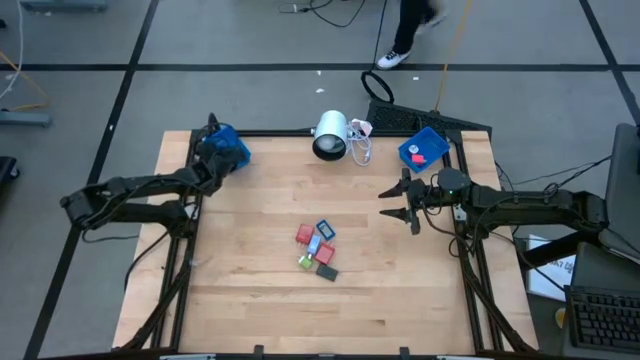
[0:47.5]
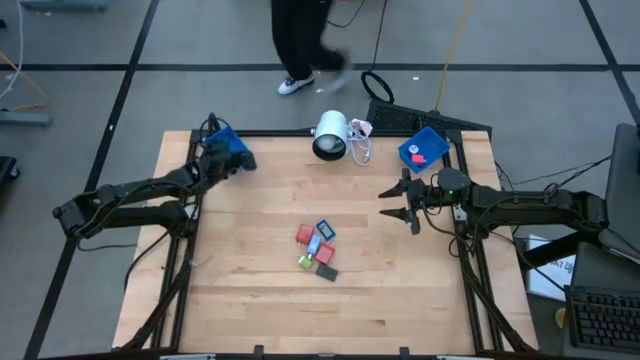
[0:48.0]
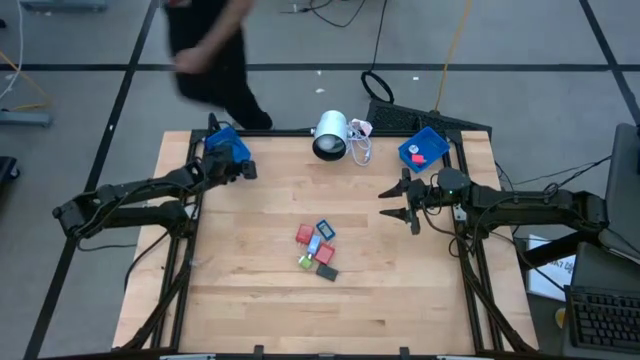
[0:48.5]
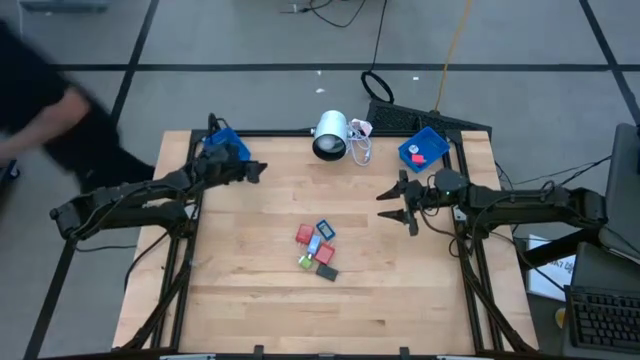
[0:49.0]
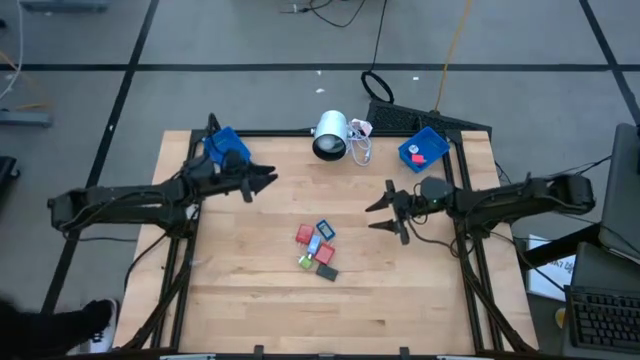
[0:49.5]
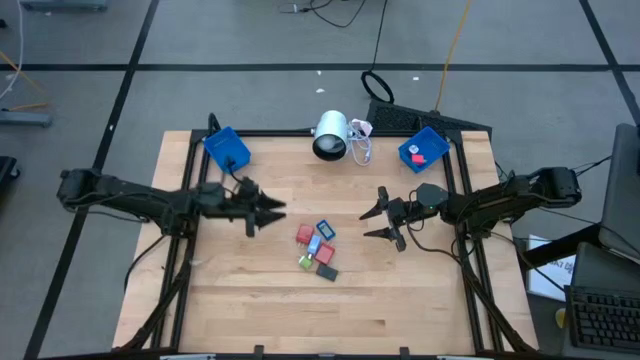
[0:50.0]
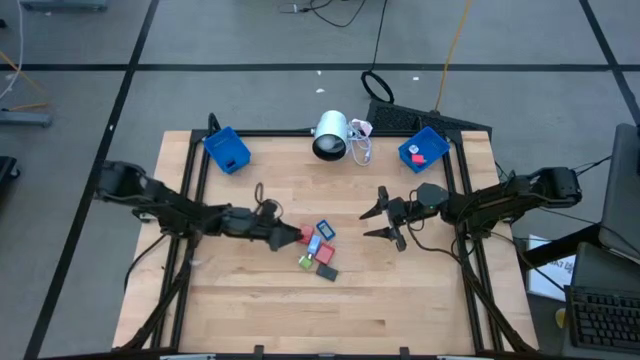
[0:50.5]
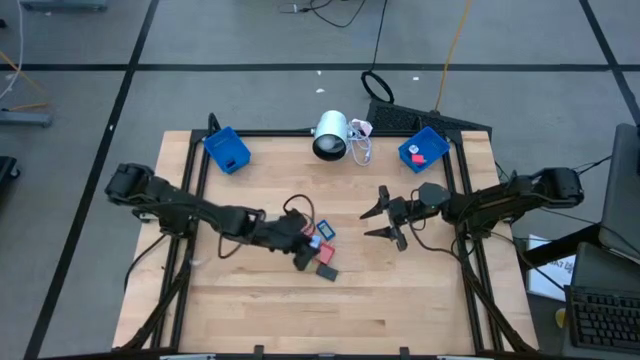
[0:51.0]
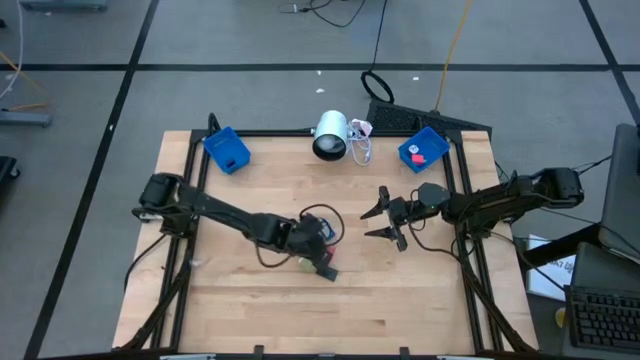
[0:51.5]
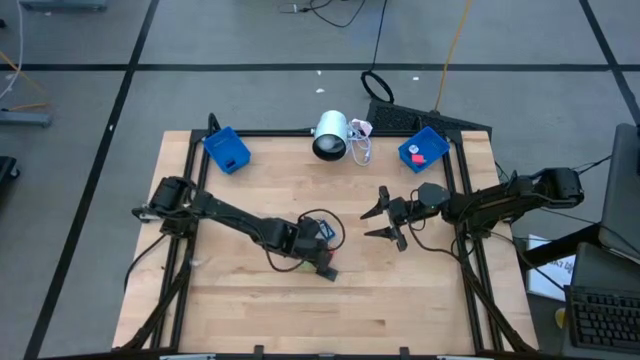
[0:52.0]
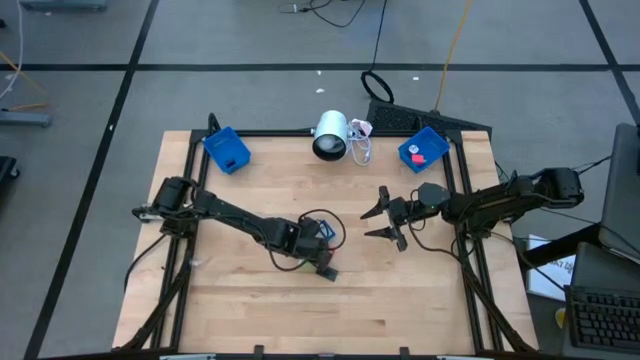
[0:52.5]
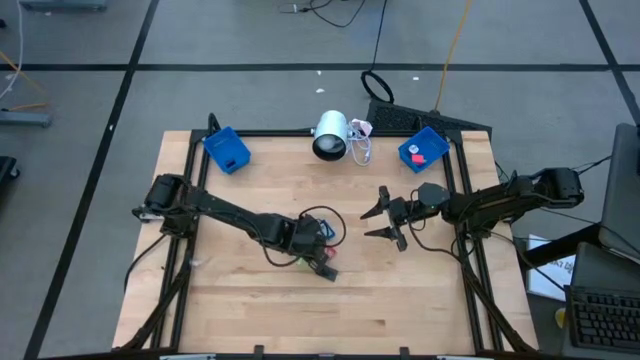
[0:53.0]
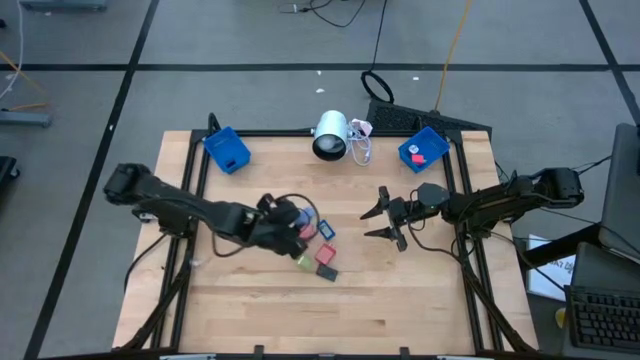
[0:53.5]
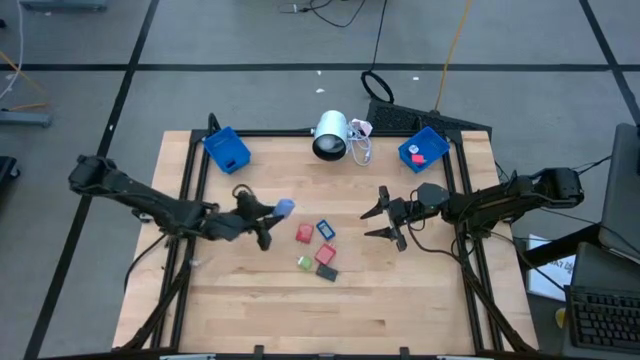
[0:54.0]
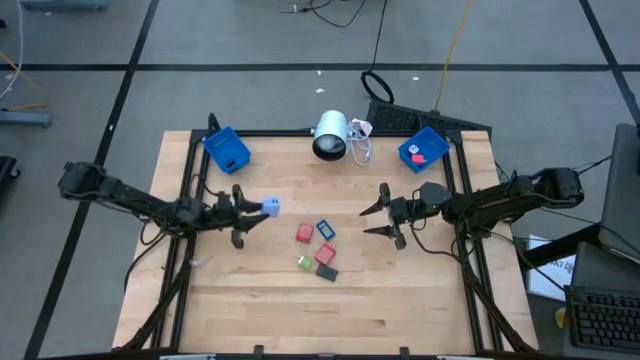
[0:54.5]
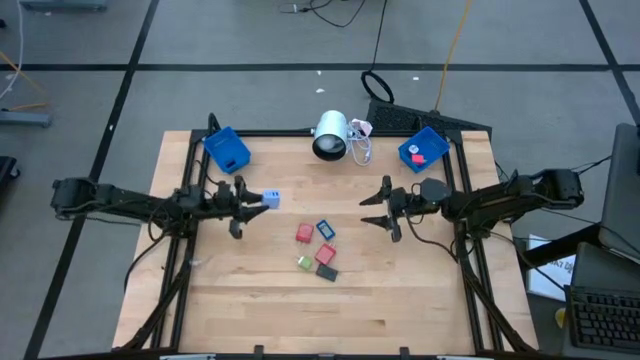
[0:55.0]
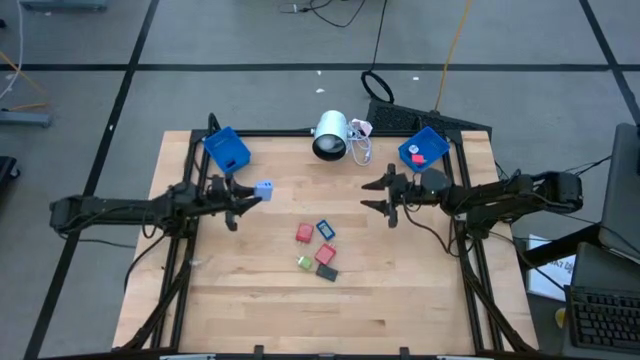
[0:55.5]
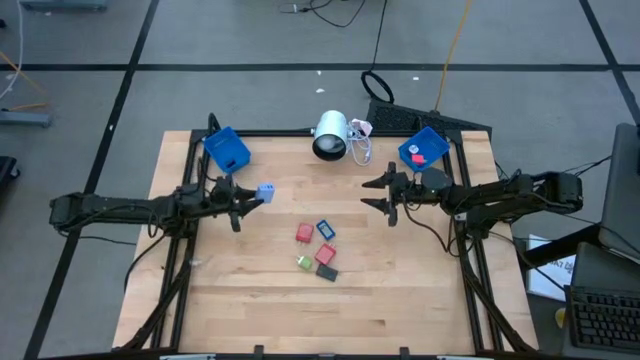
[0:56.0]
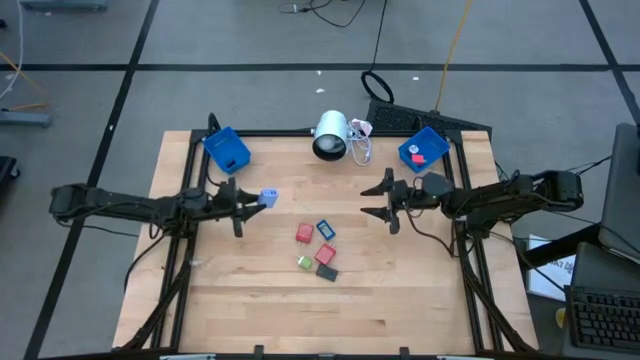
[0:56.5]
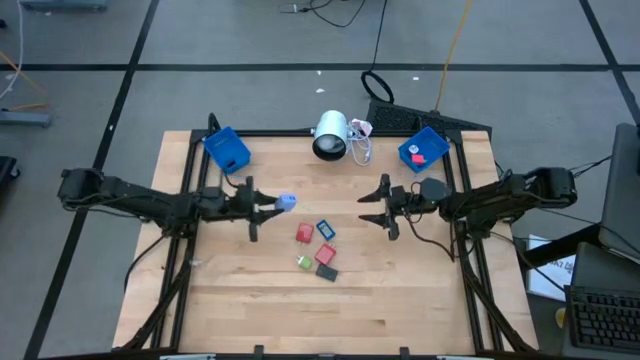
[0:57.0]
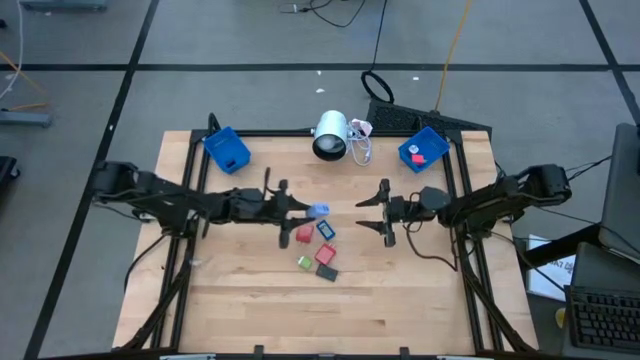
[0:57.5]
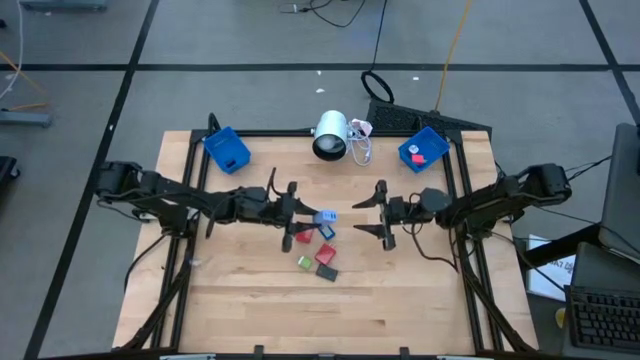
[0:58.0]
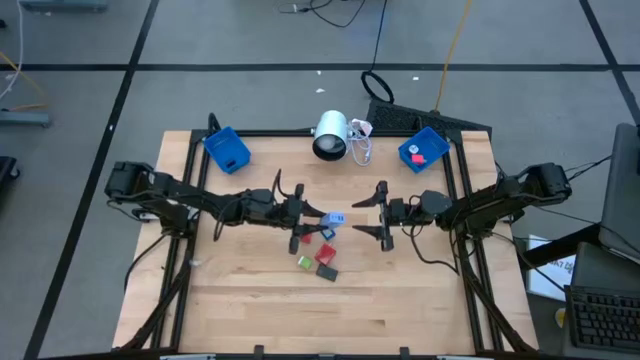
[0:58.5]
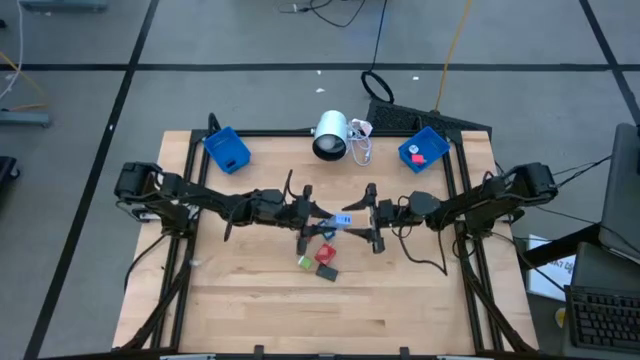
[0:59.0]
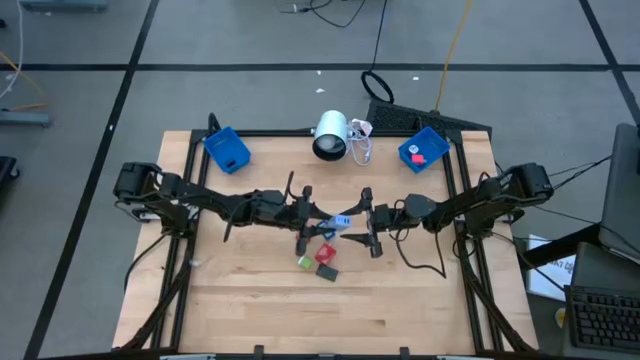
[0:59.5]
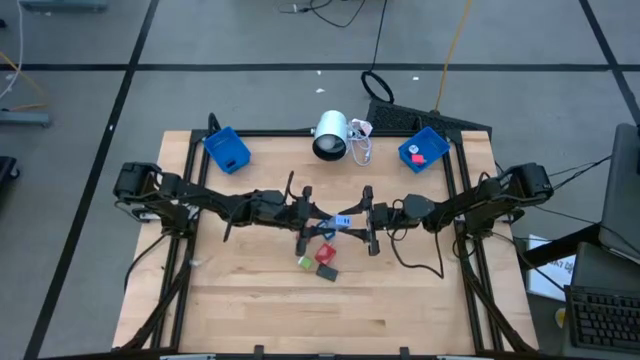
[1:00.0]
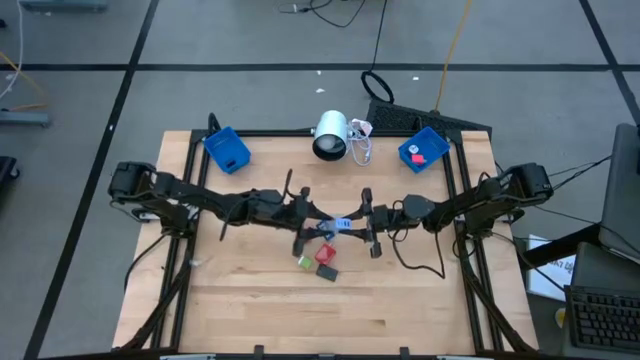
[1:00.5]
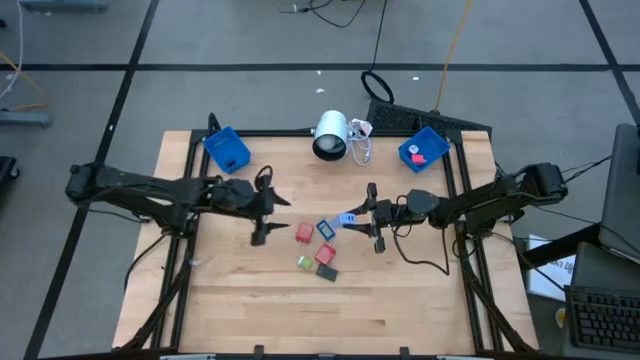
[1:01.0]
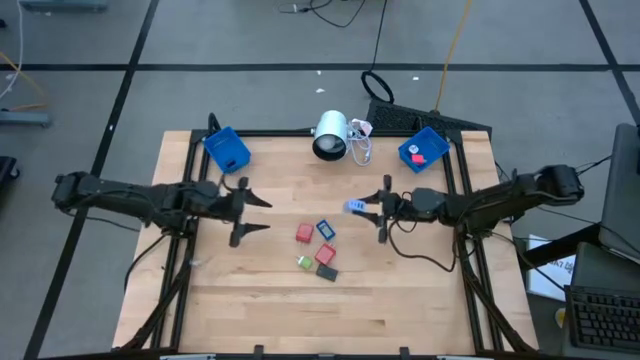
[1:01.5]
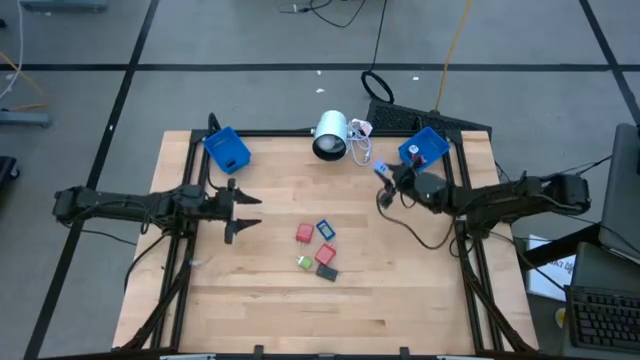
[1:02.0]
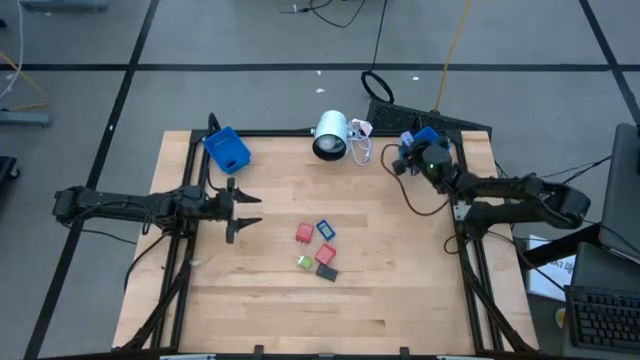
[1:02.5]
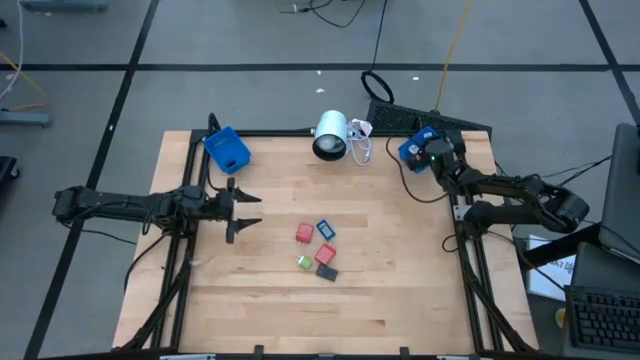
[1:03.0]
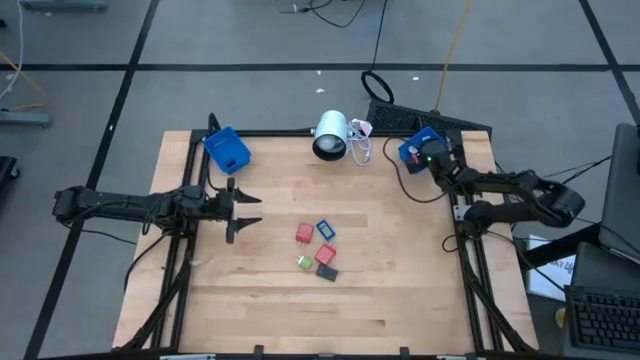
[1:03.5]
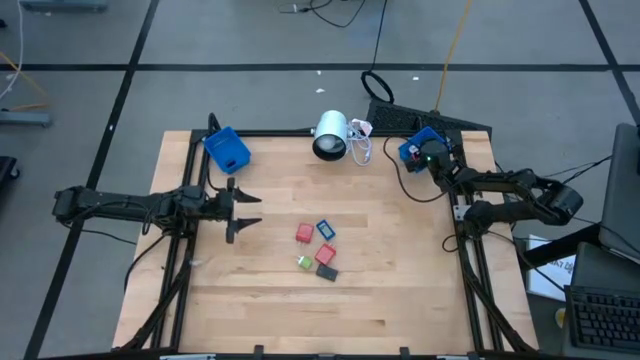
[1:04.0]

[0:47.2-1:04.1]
Task: Pick & Place Office items
Put the blue charger adapter into the right blue bin

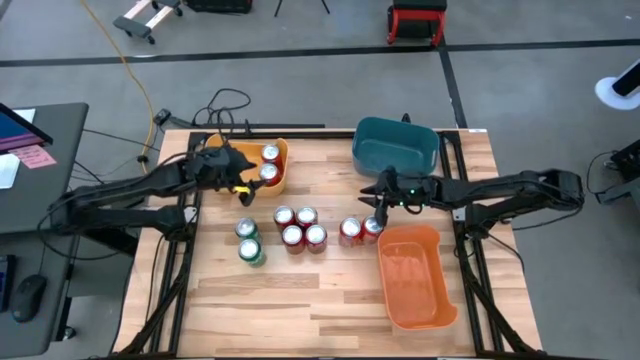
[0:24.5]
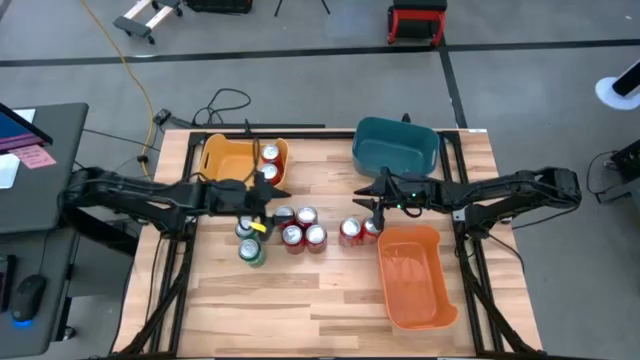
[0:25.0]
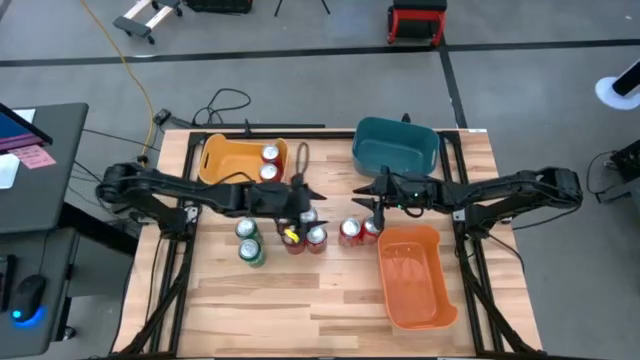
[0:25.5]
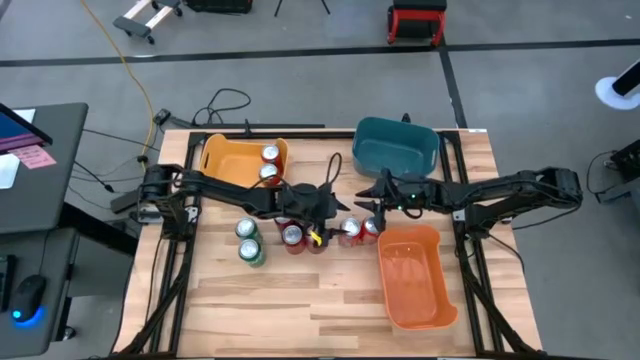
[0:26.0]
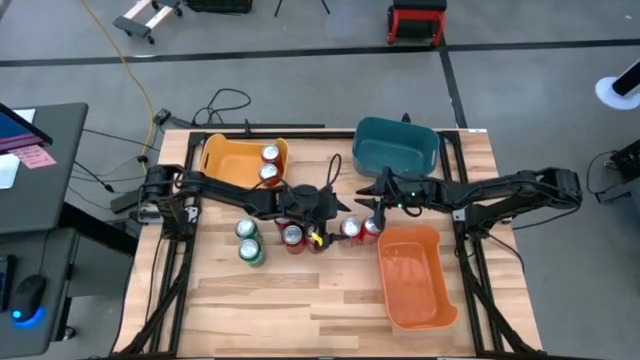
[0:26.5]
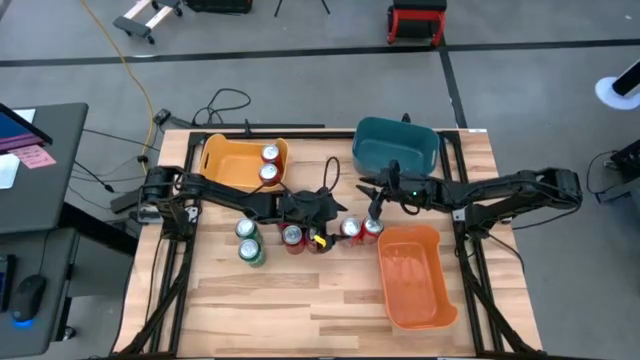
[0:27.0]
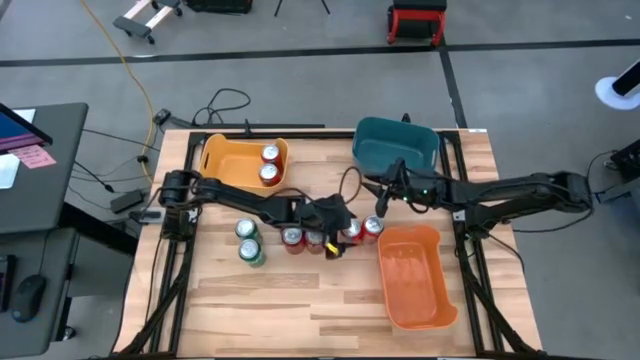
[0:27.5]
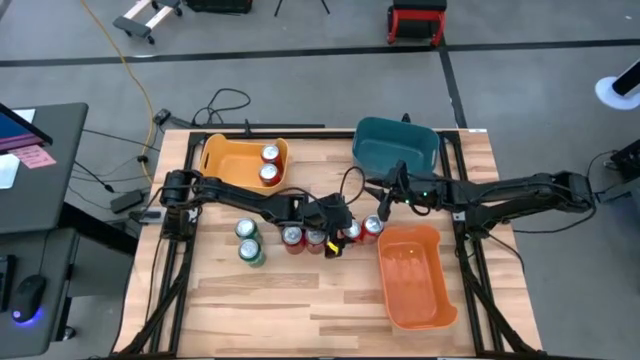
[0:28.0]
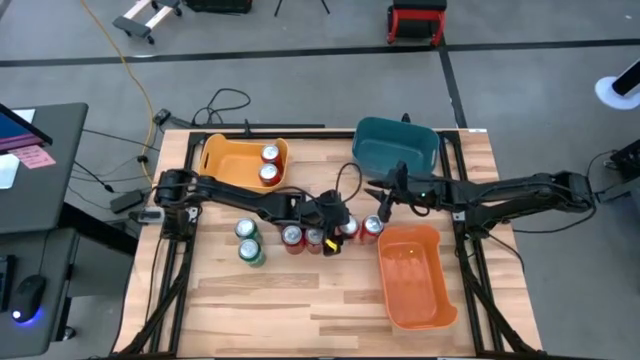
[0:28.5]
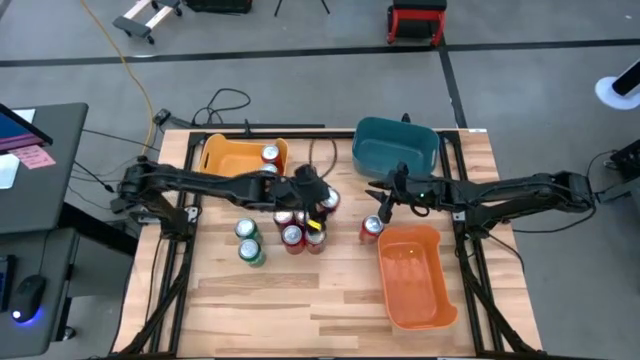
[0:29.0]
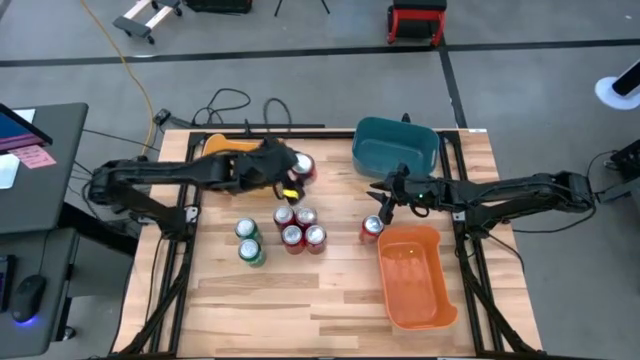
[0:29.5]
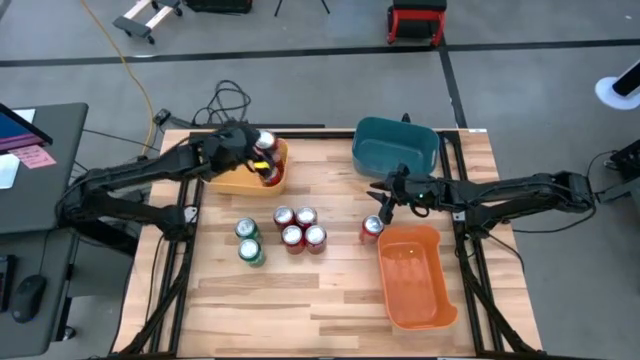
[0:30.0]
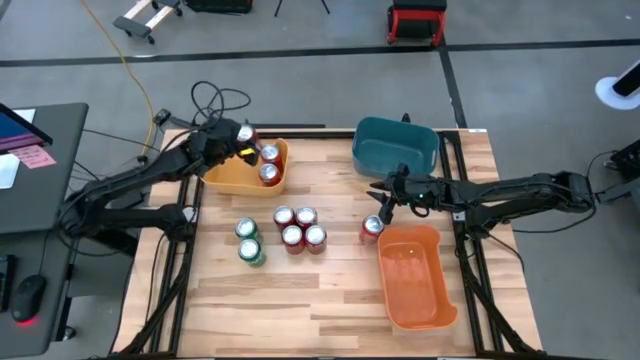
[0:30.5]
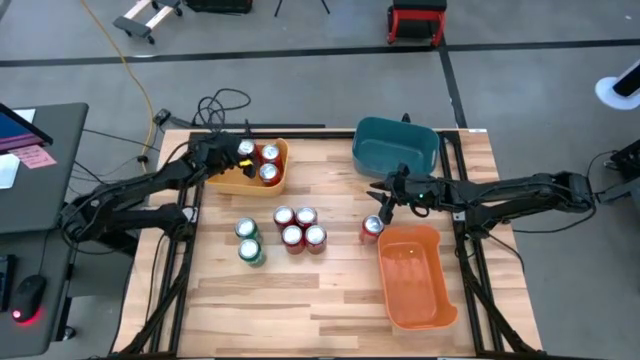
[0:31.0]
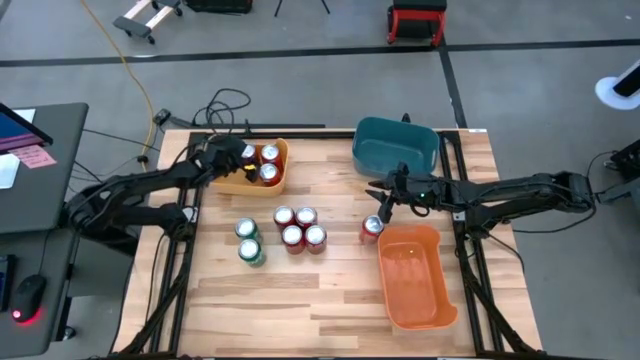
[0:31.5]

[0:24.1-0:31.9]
Task: Sort soda cans
Put the left orange soda can into the yellow bin
